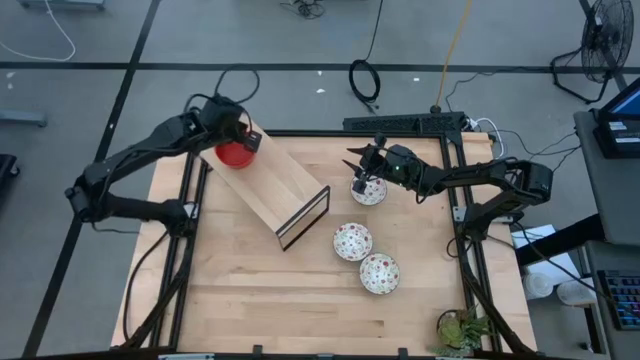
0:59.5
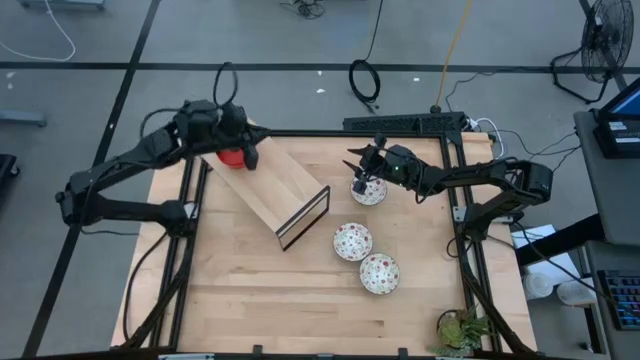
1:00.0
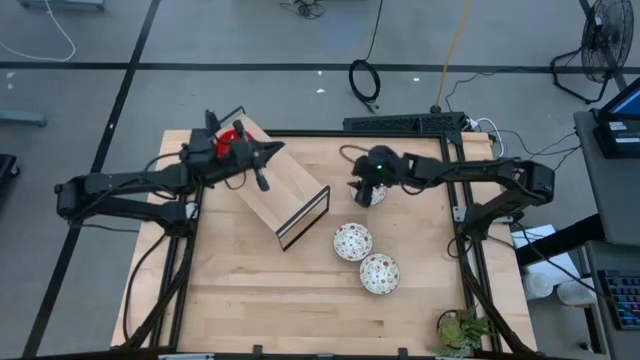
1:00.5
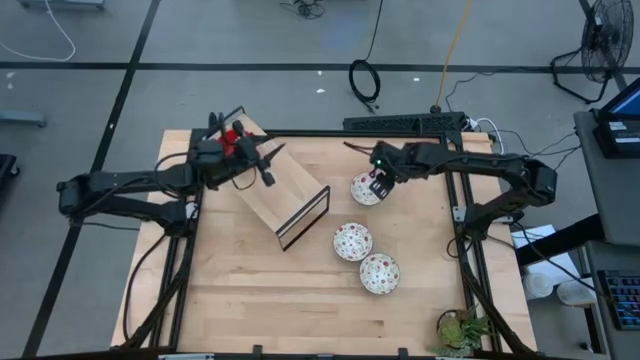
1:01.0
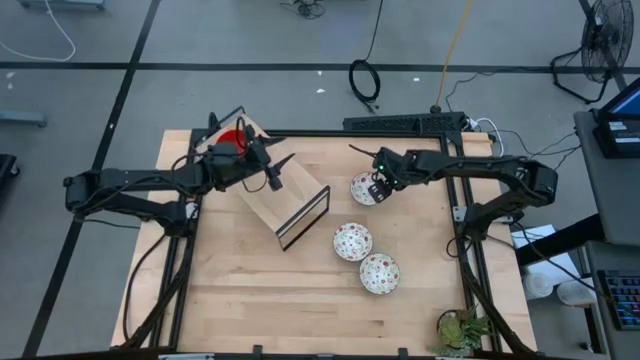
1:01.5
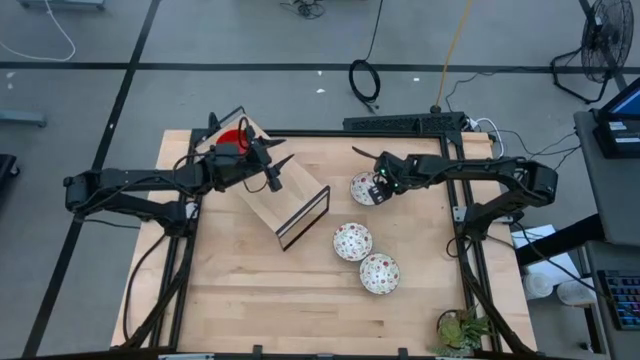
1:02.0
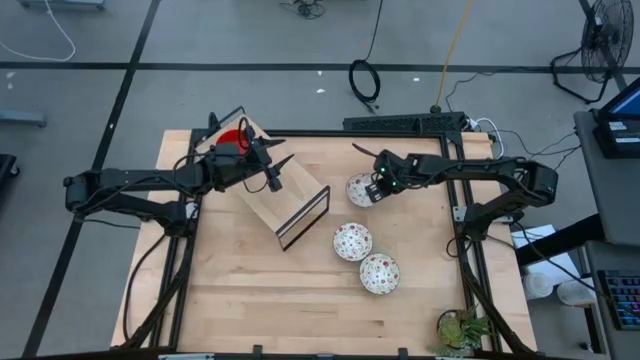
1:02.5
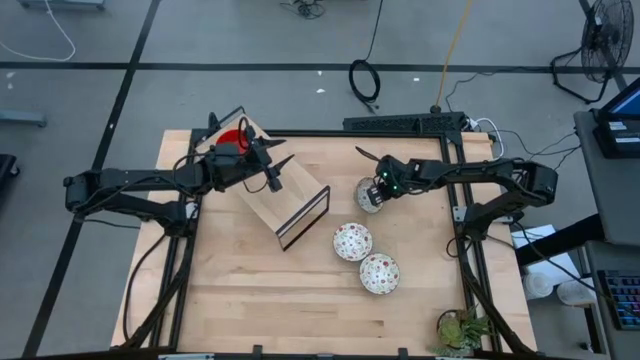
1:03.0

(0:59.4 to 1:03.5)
Task: Pick & Place Mini bowls
Put the top white patterned bowl on the shelf

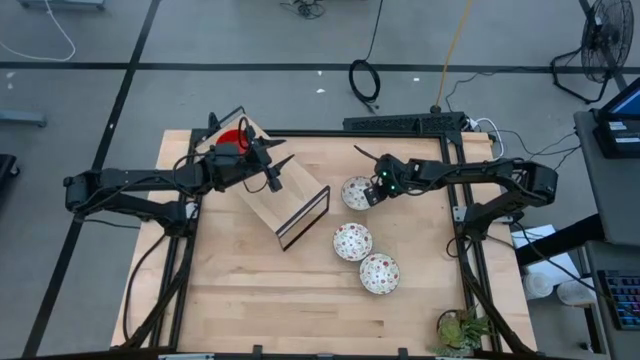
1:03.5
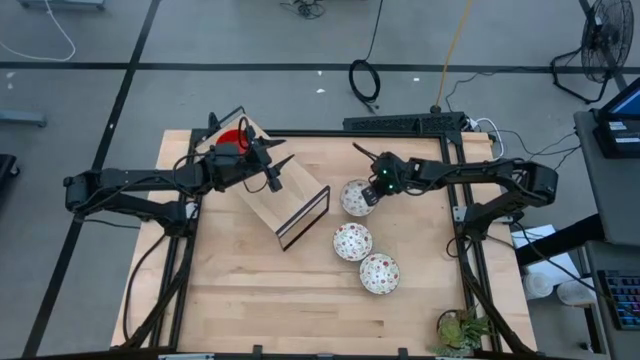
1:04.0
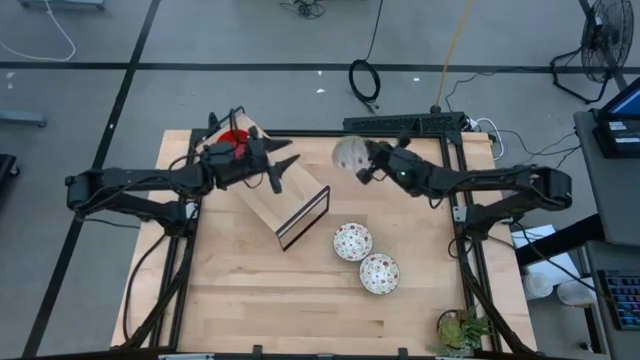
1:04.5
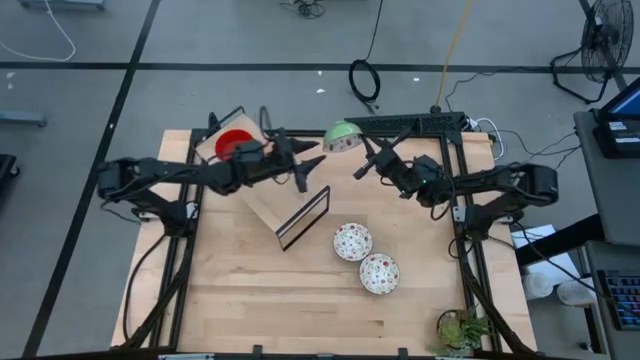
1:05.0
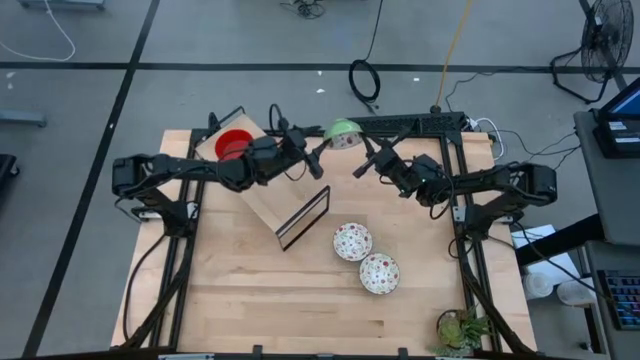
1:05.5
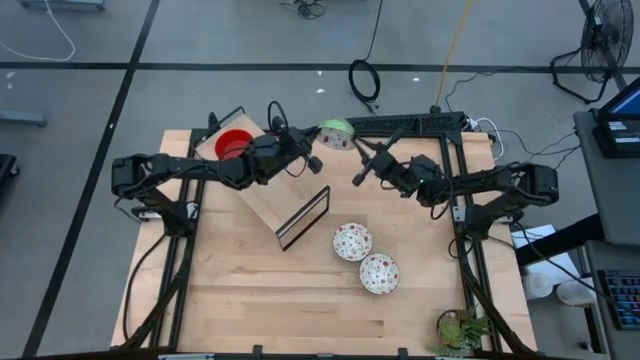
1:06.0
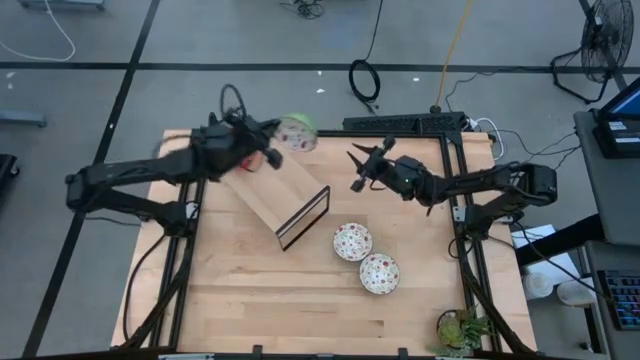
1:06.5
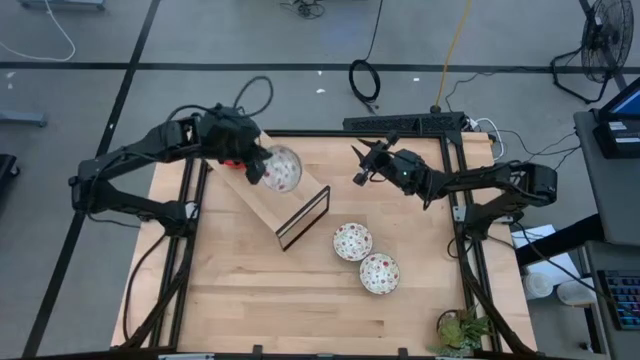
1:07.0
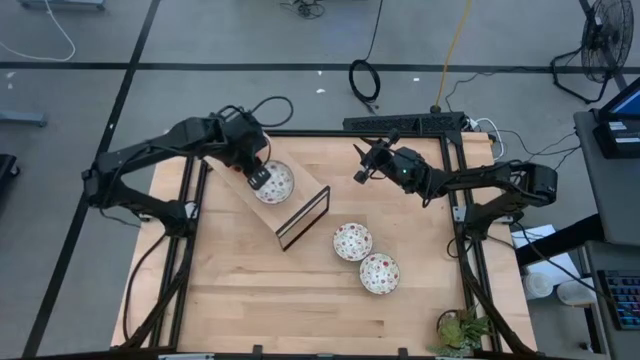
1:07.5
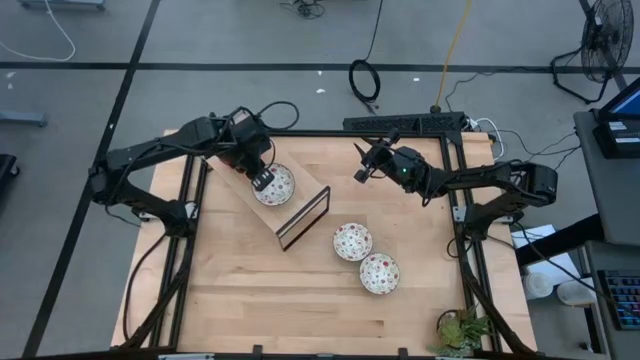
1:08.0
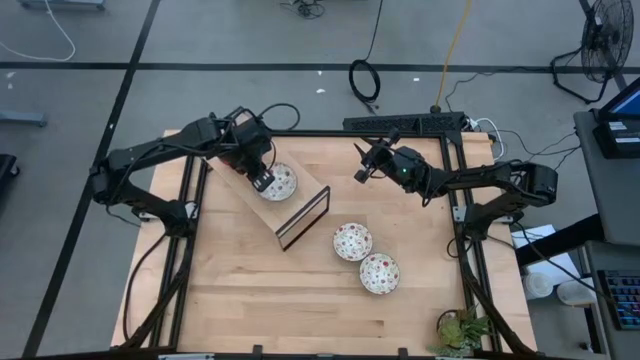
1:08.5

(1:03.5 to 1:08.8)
Put the top white patterned bowl on the shelf

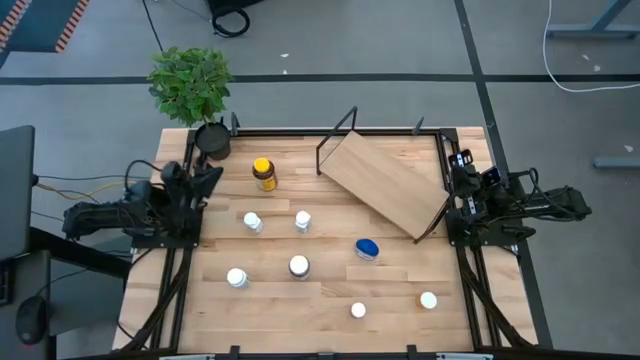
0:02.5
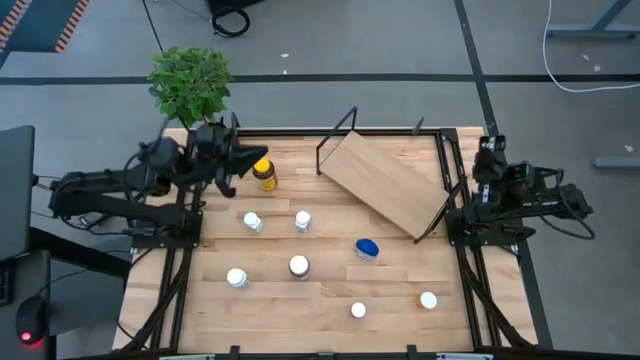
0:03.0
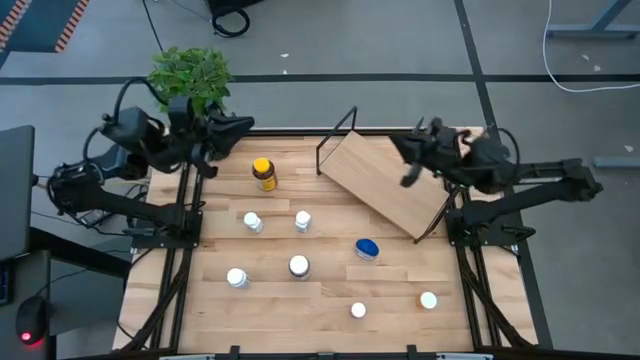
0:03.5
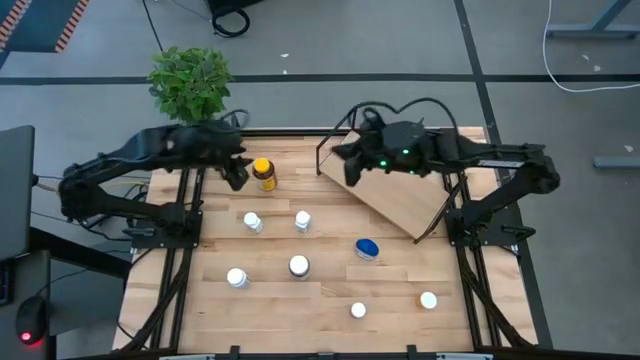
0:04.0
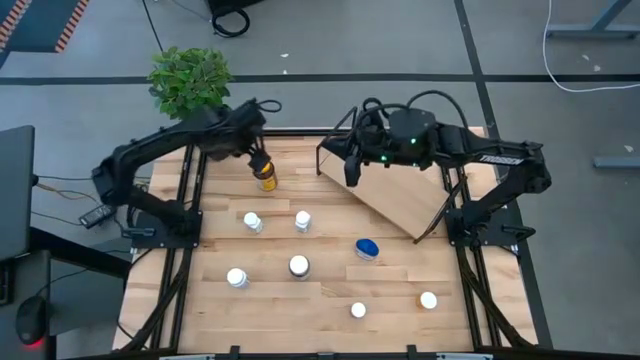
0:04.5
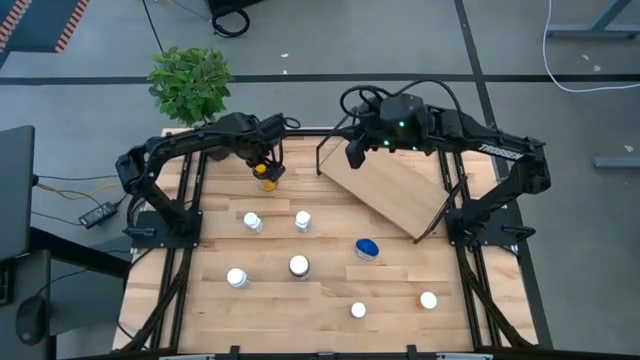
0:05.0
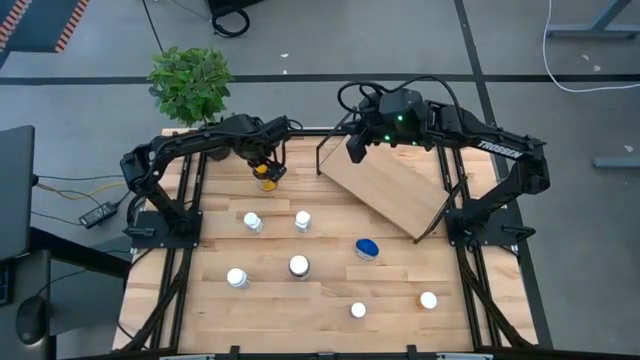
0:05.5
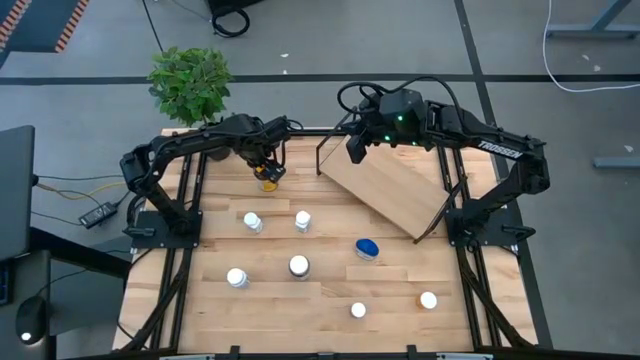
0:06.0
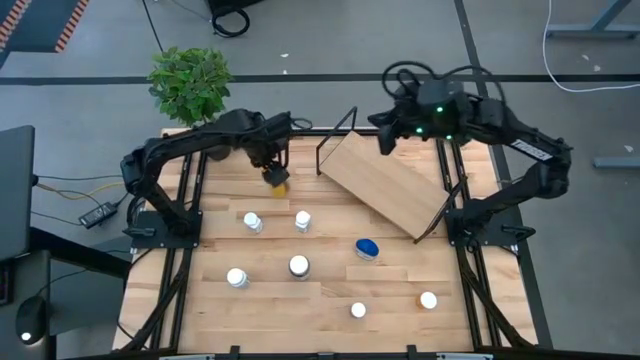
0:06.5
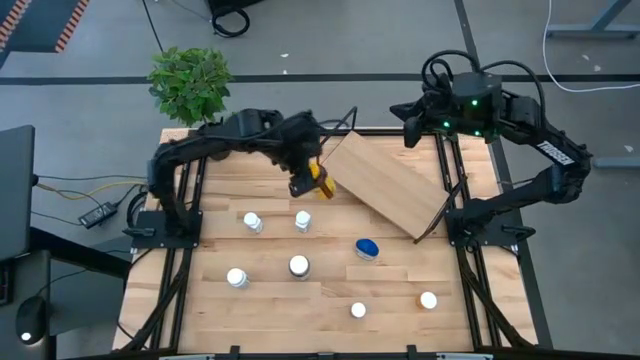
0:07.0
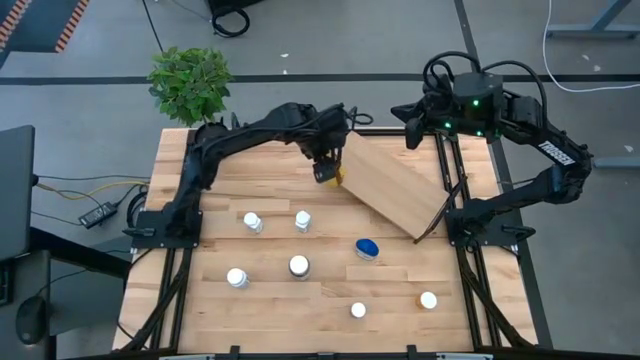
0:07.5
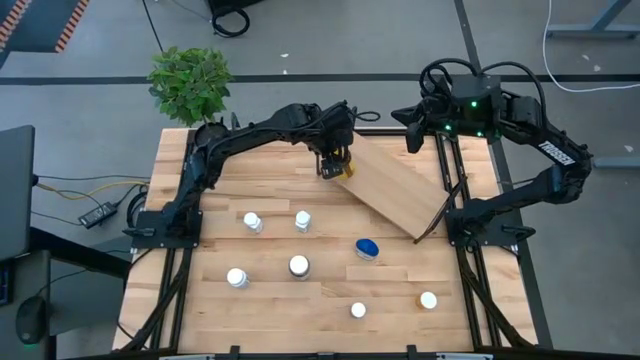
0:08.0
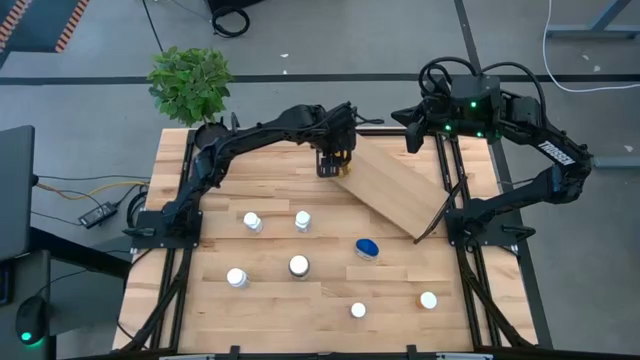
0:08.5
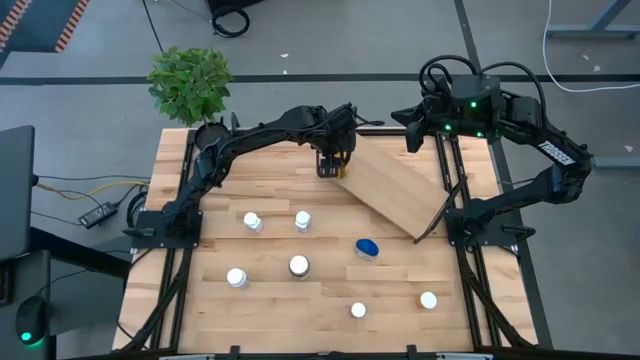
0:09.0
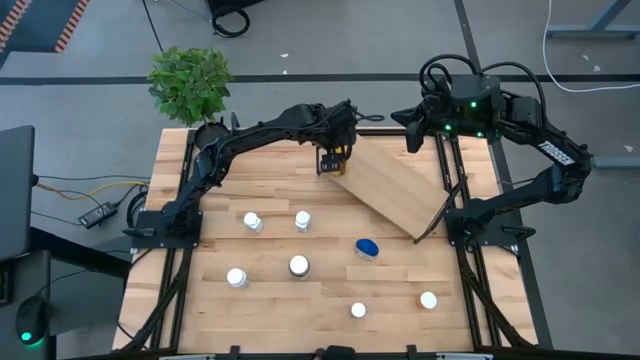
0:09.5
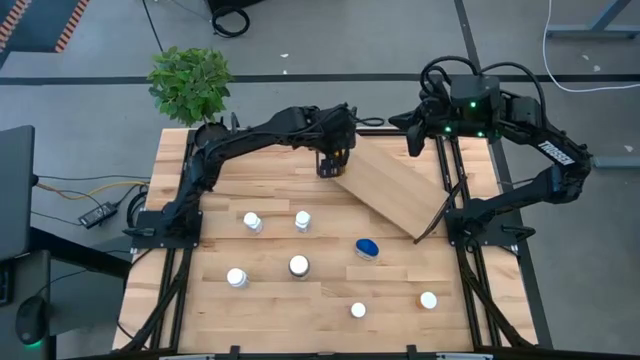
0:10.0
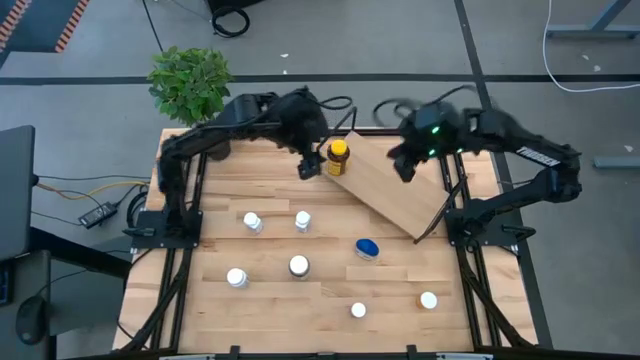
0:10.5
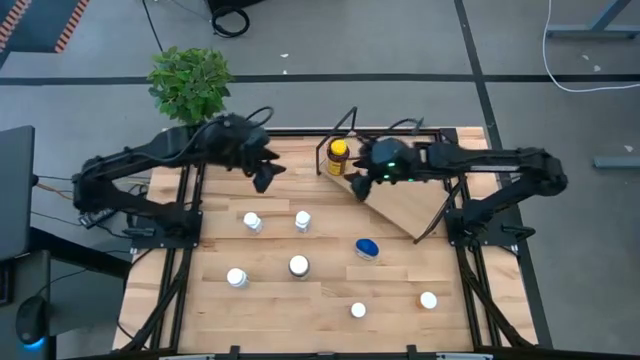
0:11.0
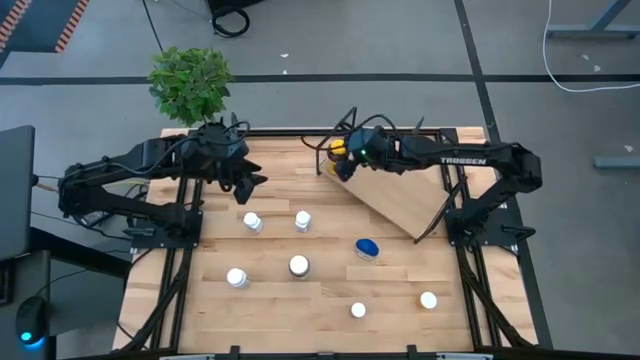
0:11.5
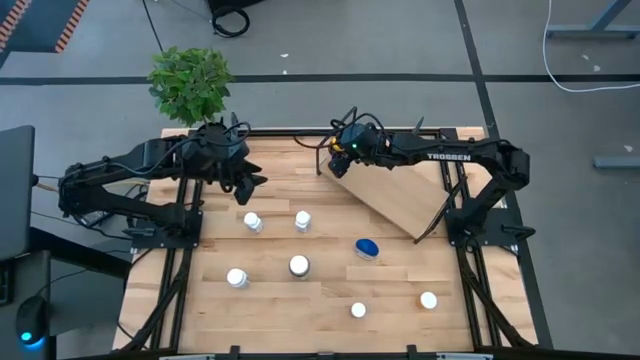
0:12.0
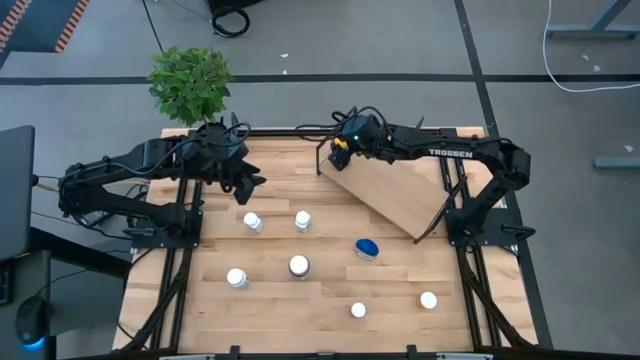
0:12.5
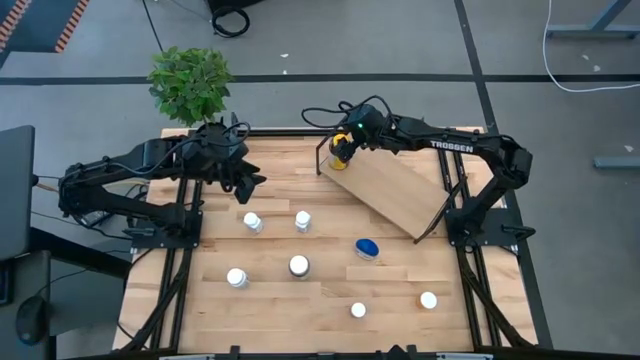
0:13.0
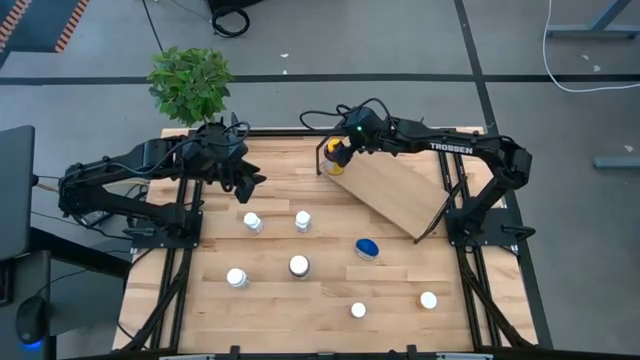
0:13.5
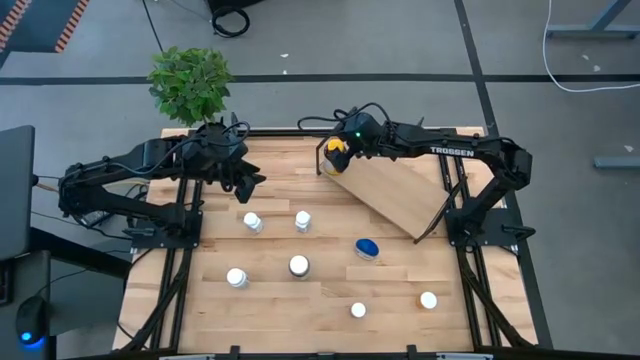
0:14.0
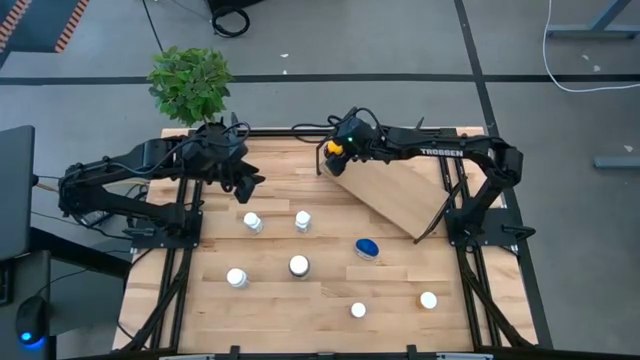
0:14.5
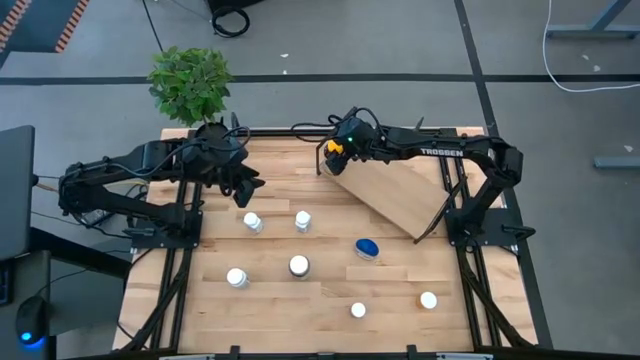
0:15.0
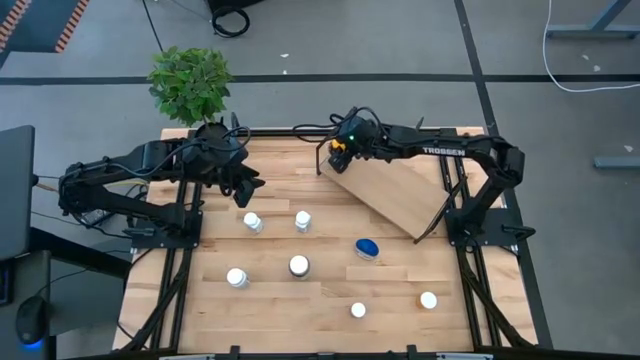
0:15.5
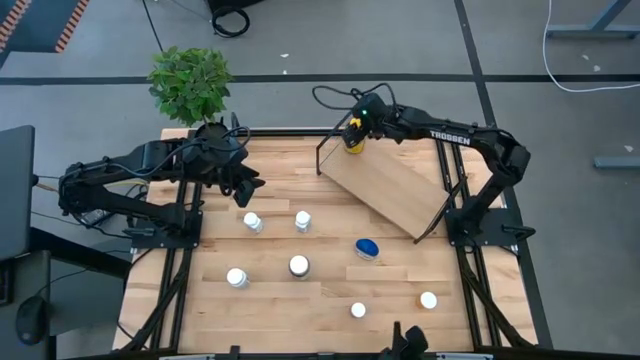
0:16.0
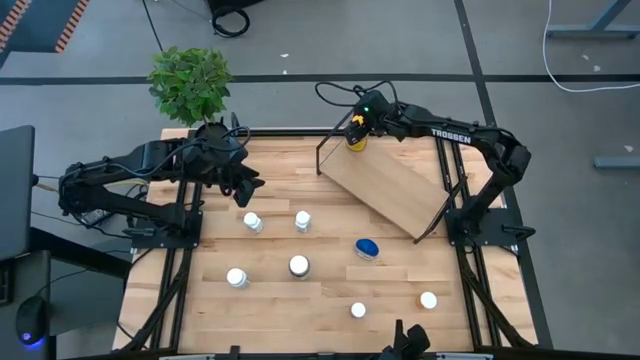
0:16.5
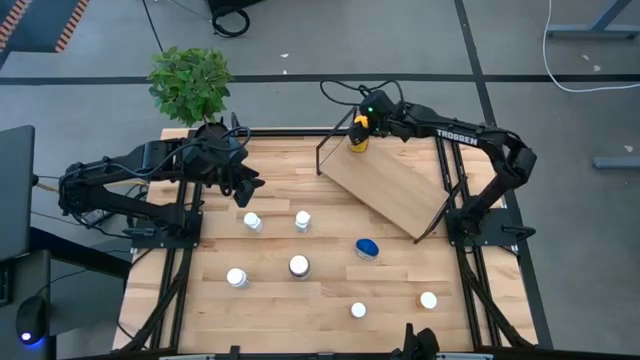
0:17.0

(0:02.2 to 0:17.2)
Task: Pick and place medicine bottles onto shelf by color
Put the yellow medicine bottle on the shelf
